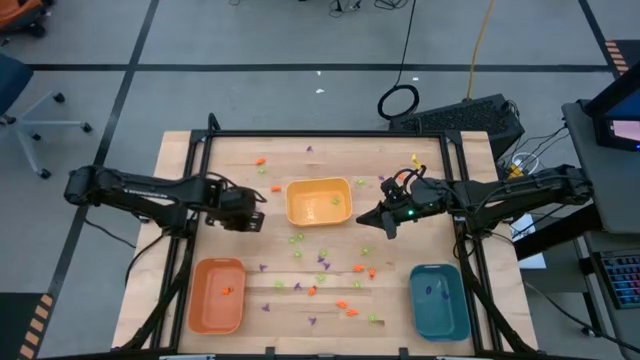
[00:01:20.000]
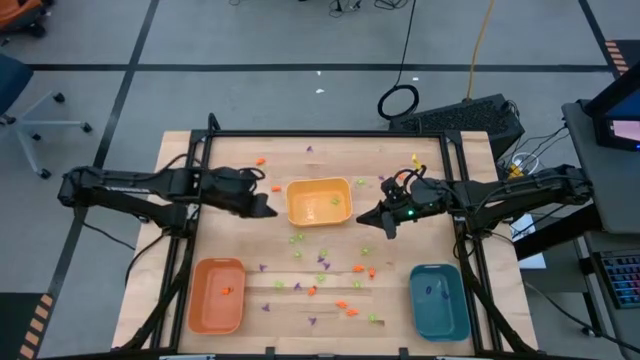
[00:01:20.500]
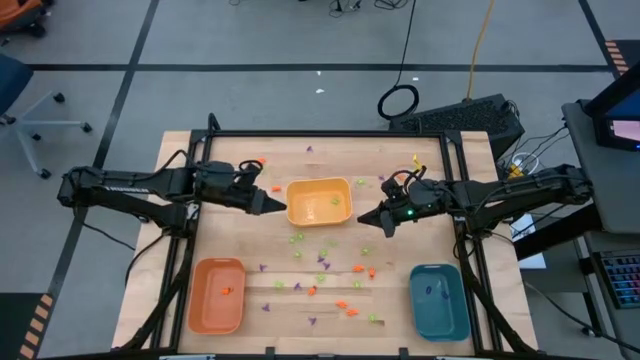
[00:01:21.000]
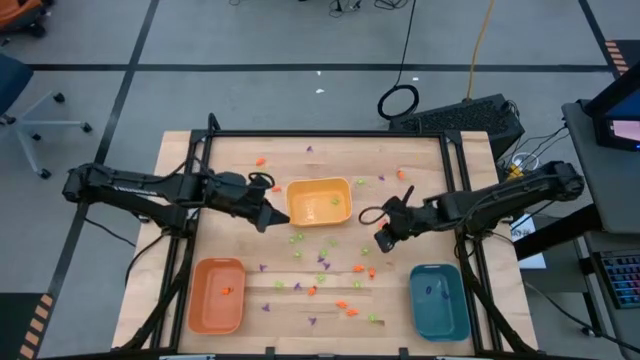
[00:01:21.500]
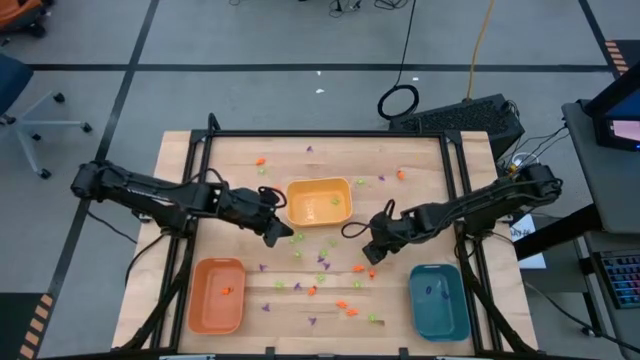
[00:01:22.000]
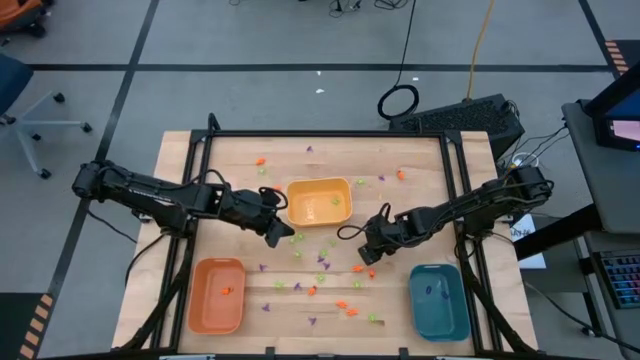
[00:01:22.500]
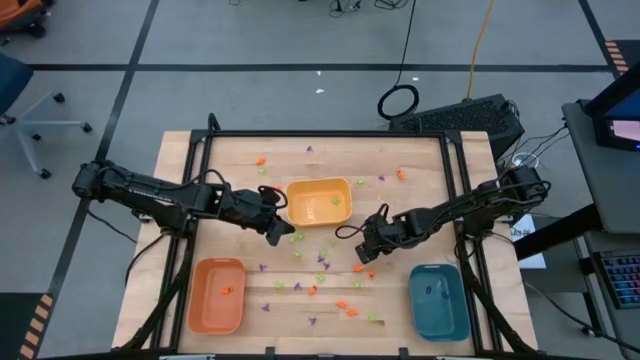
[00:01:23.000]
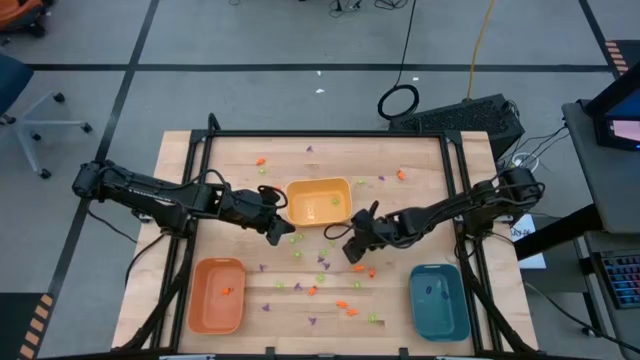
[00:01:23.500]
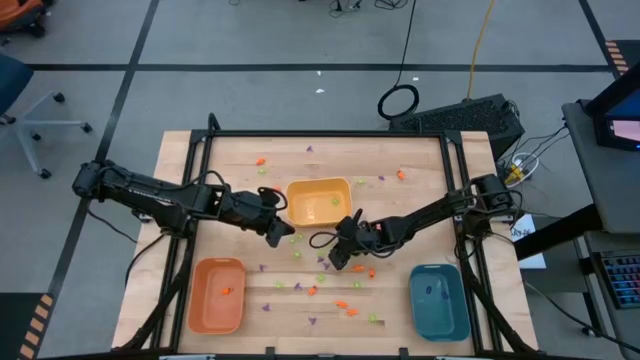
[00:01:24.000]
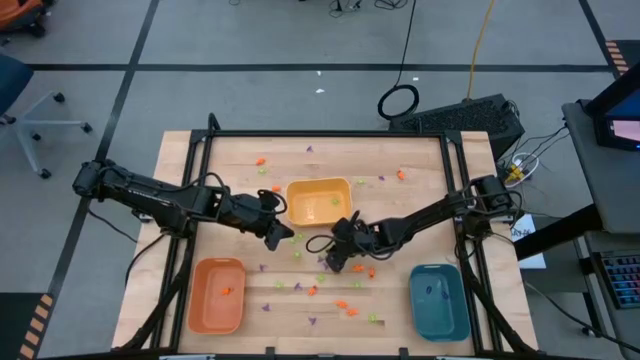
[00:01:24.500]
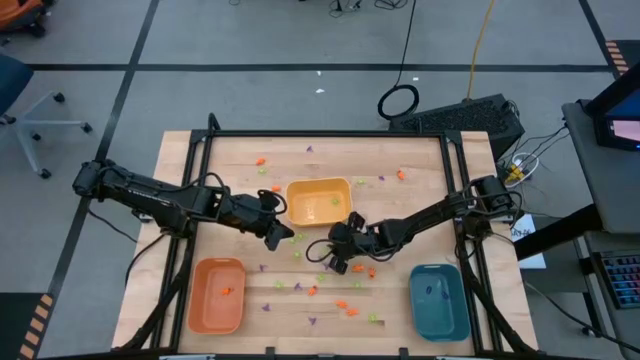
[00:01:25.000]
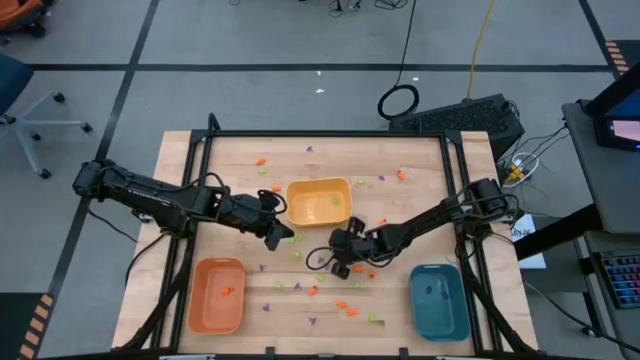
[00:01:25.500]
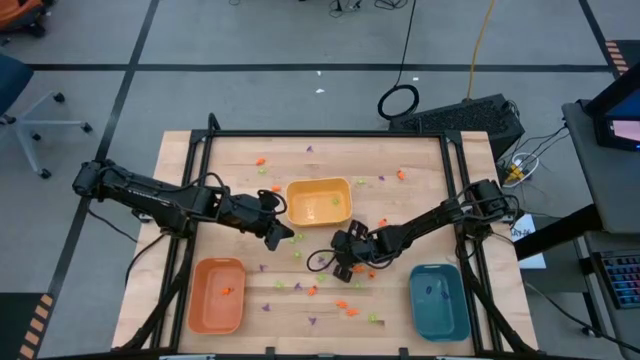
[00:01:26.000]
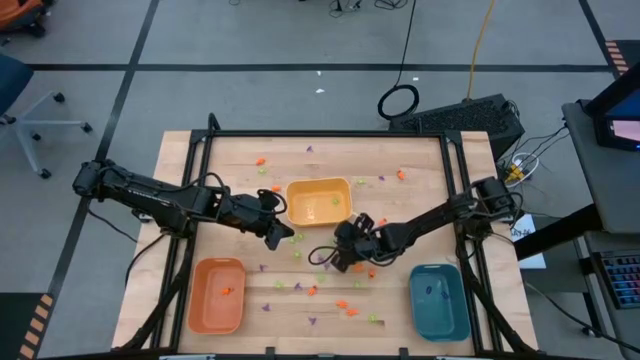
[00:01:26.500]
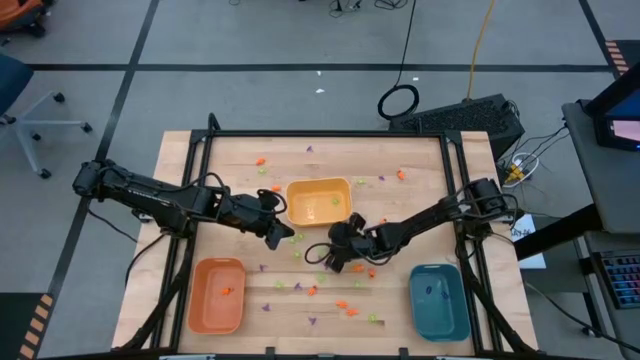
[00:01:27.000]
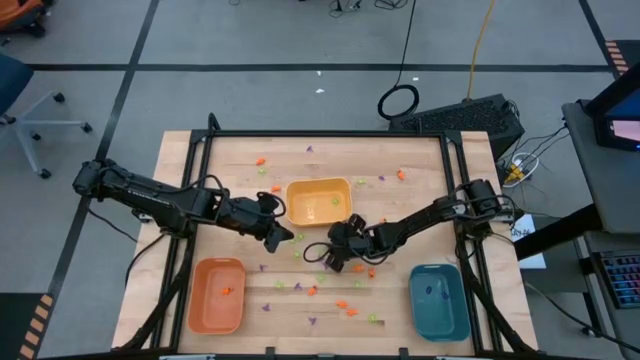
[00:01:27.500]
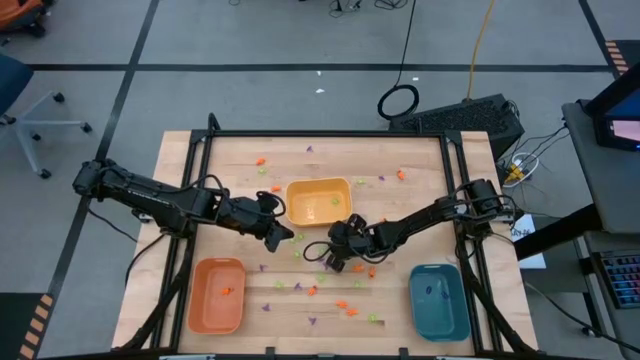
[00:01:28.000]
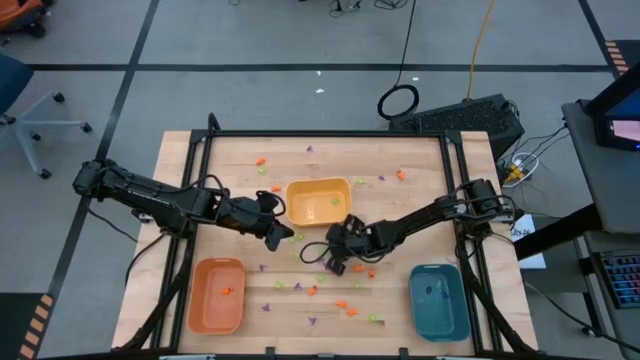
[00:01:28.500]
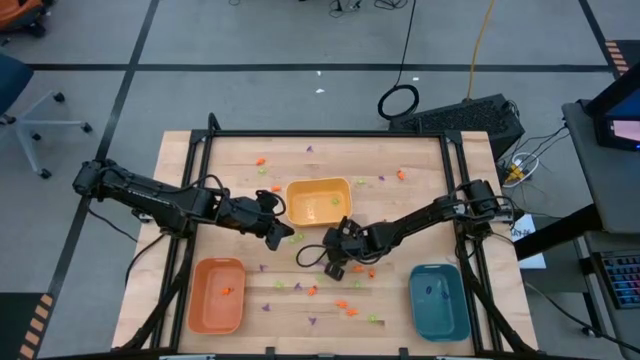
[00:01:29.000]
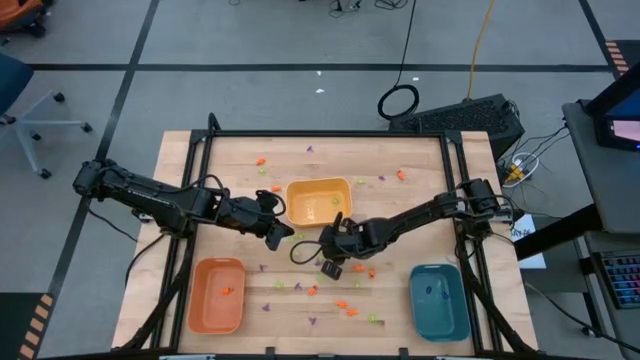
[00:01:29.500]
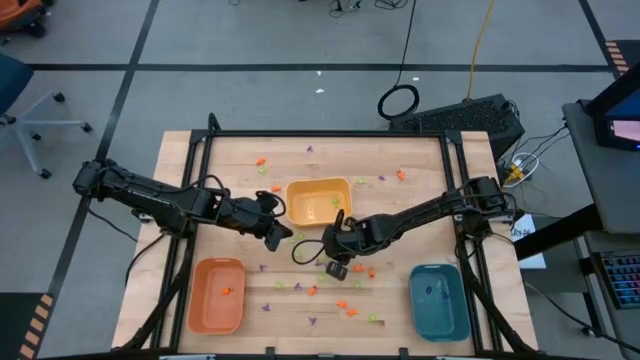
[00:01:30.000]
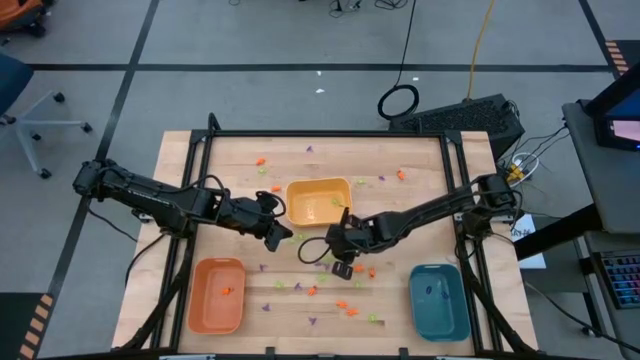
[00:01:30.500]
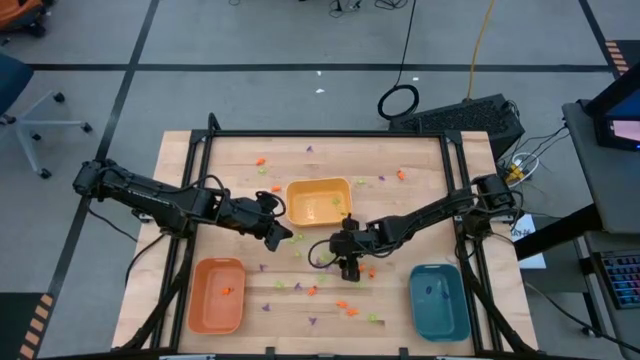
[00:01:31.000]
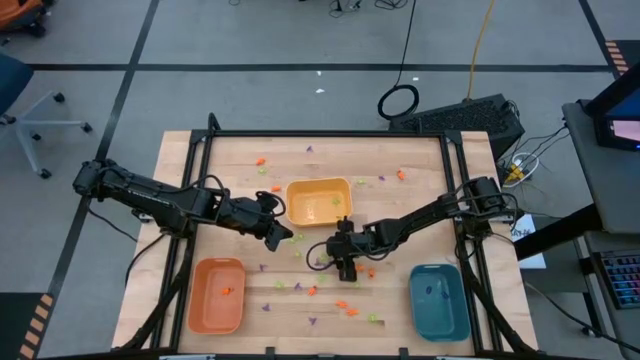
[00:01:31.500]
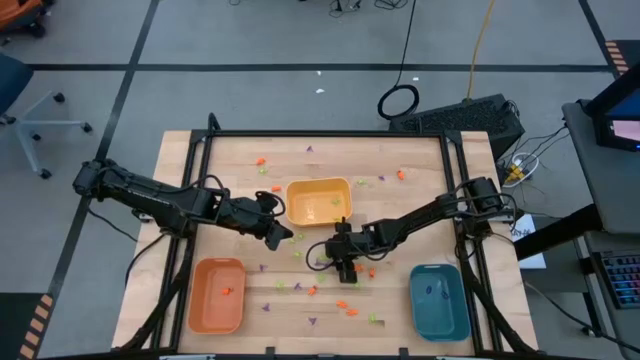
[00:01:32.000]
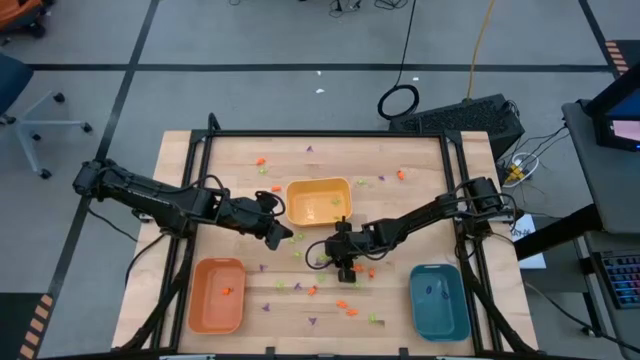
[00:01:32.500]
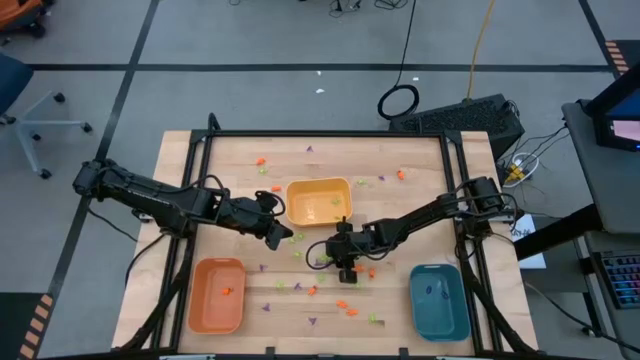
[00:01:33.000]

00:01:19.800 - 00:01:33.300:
Task: Sort Halloween decoration
Put the green spider toy into the yellow bin

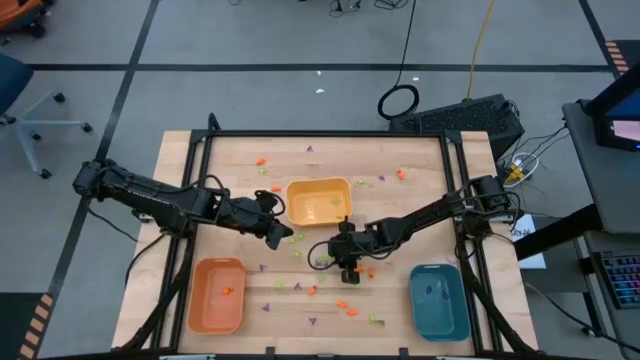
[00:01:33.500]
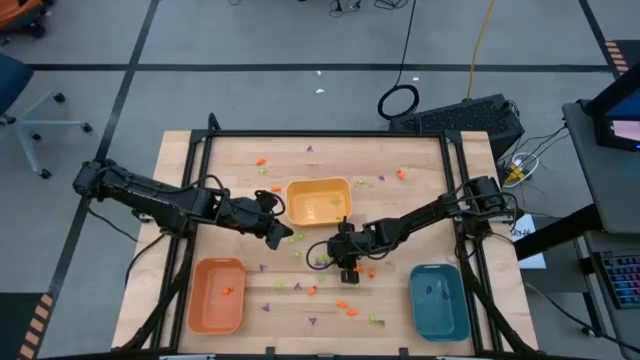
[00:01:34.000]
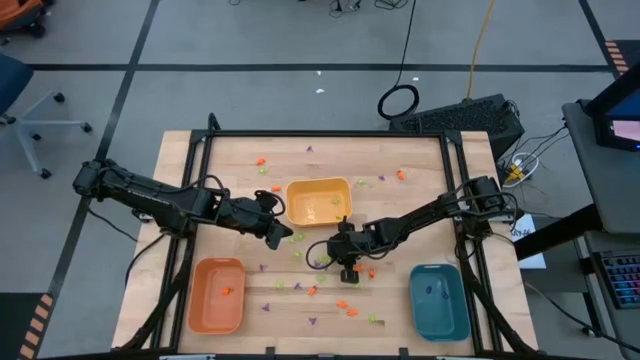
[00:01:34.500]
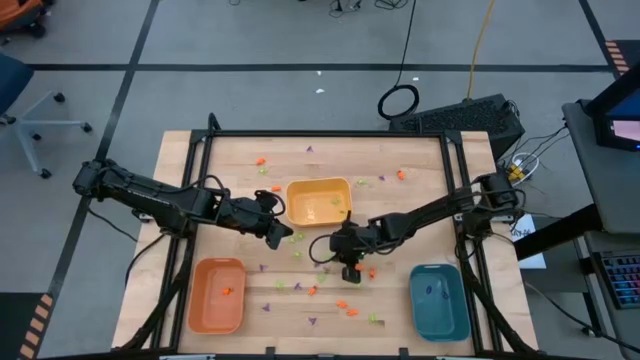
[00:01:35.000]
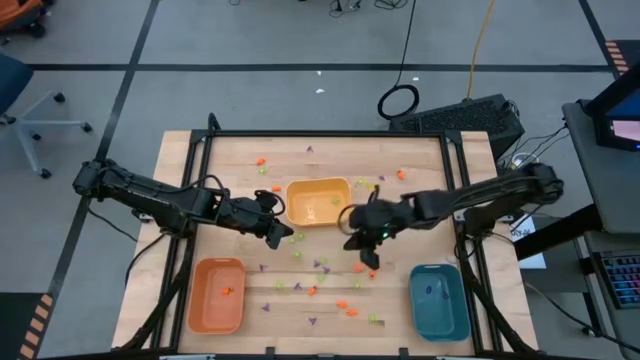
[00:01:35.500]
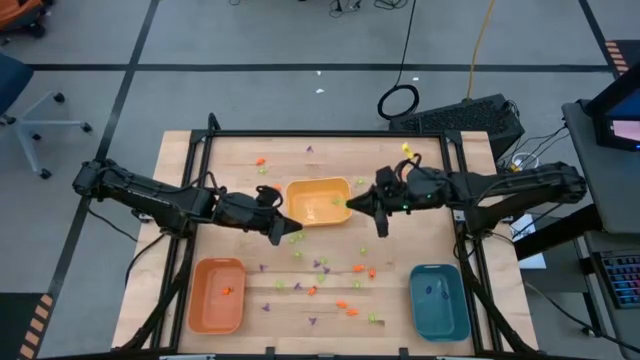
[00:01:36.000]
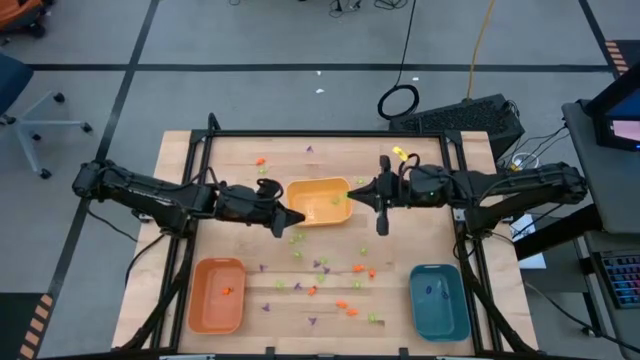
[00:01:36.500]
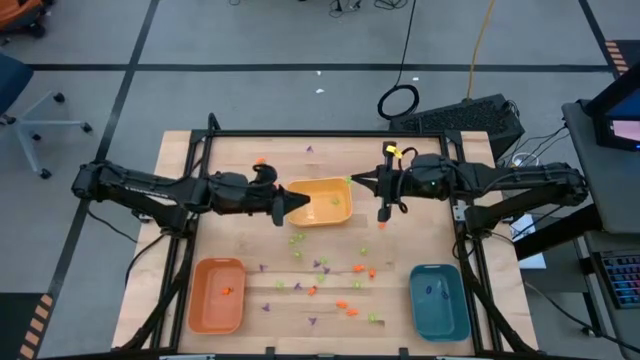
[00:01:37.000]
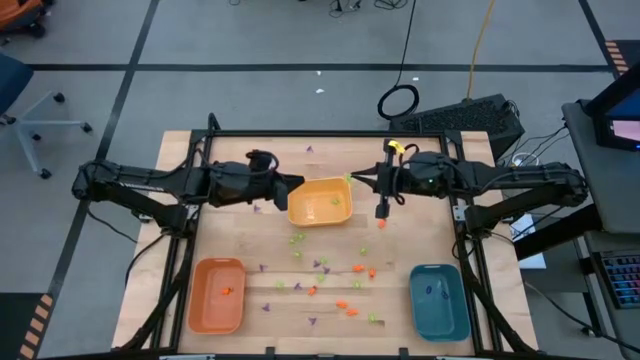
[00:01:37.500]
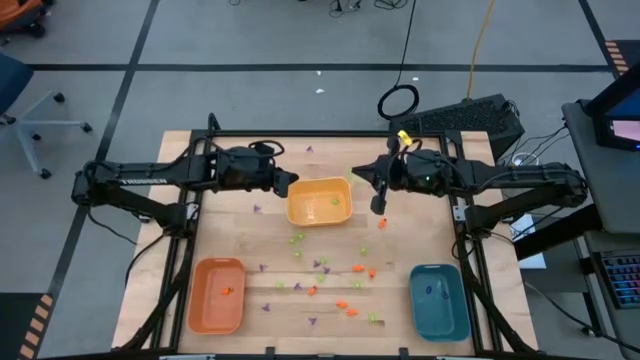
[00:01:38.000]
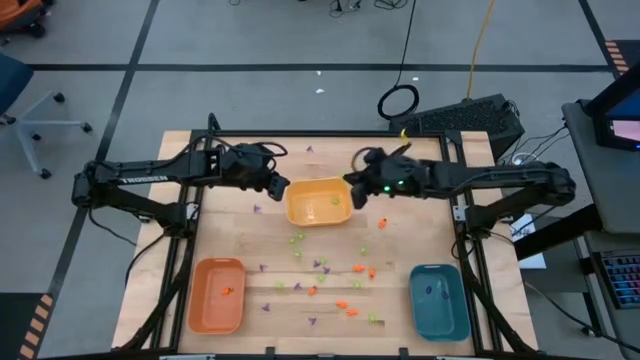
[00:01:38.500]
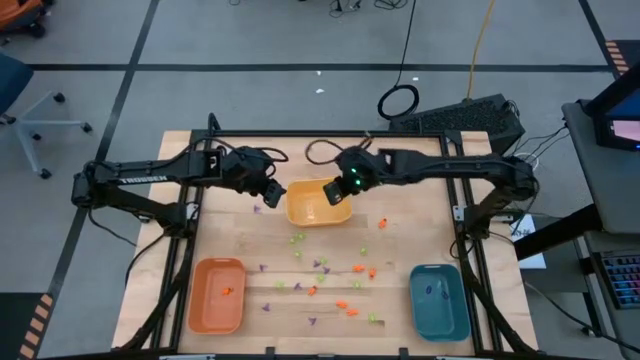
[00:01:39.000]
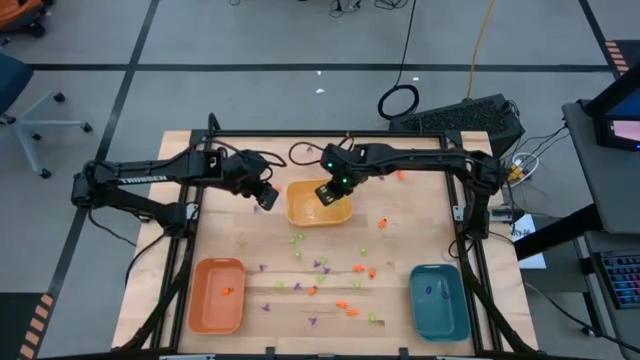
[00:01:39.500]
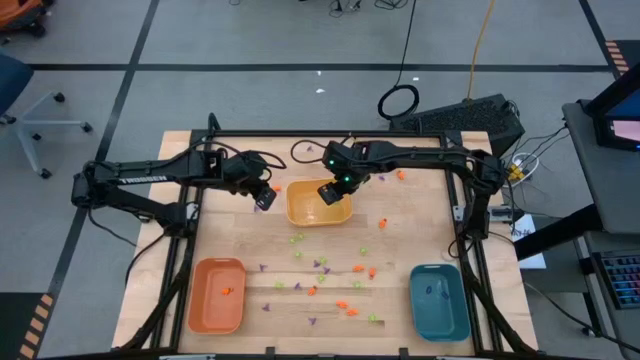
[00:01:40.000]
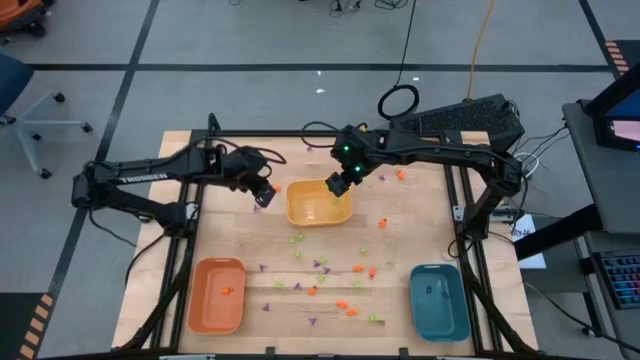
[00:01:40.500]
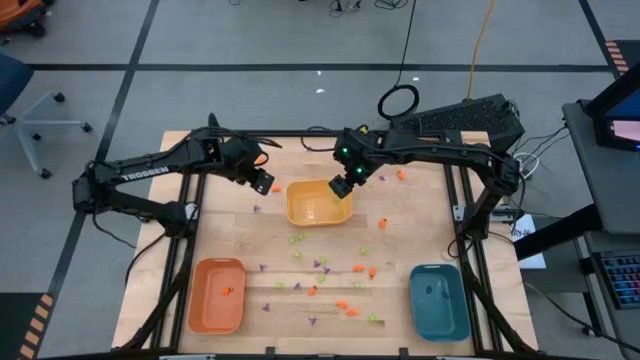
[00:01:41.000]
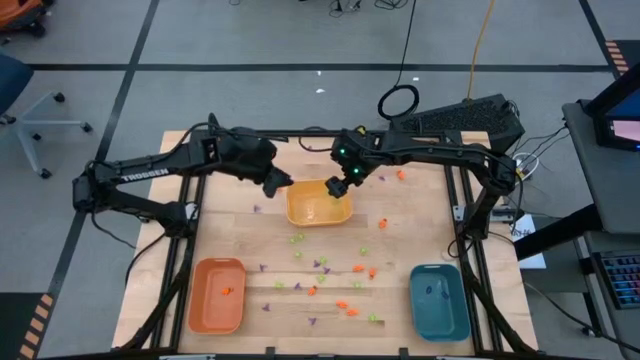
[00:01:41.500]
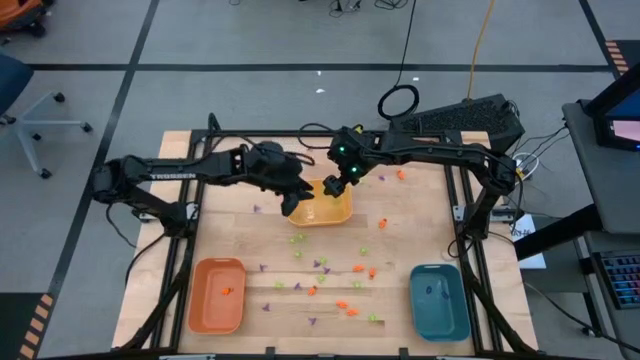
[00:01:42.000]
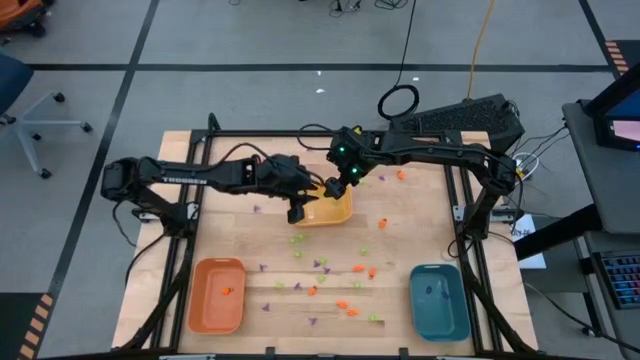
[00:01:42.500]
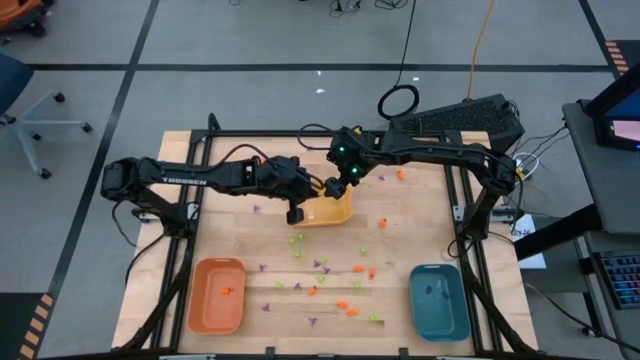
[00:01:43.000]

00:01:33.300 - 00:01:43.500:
Put the green spider toy into the yellow bin
